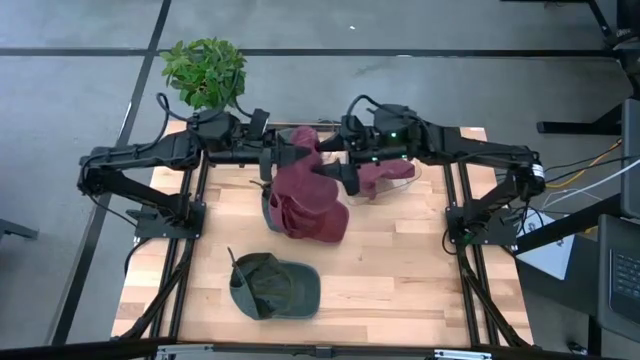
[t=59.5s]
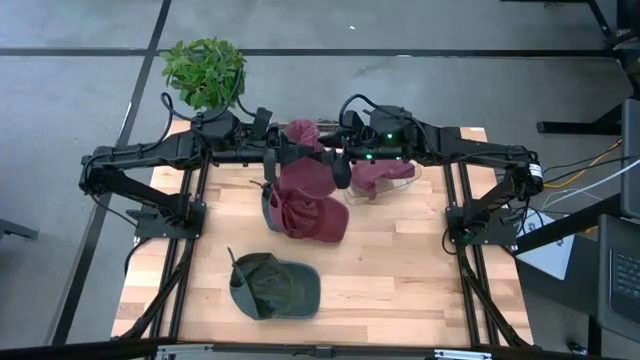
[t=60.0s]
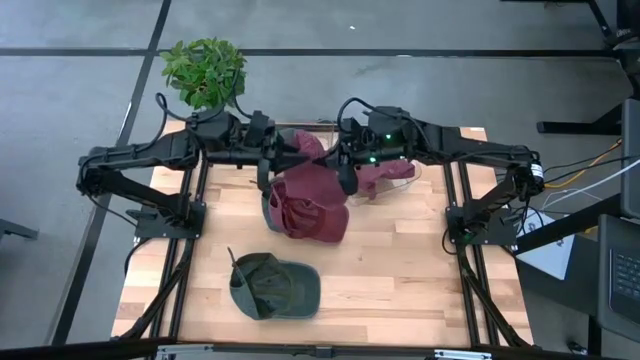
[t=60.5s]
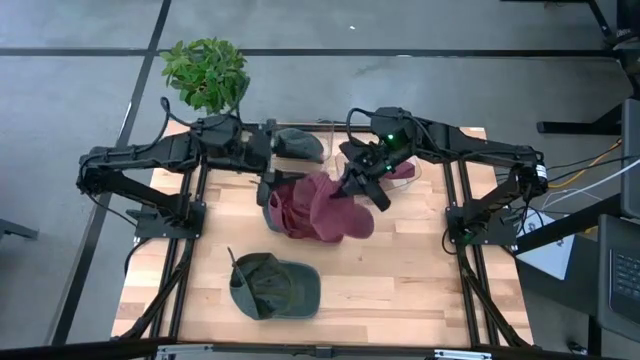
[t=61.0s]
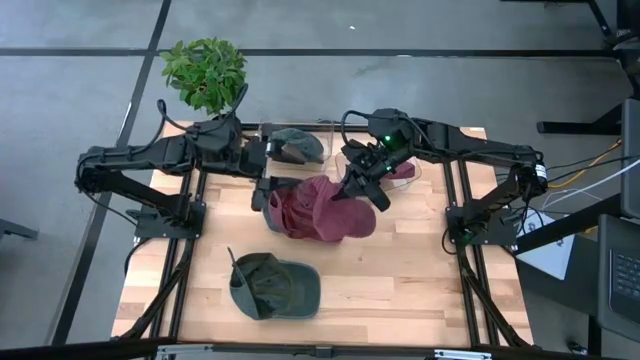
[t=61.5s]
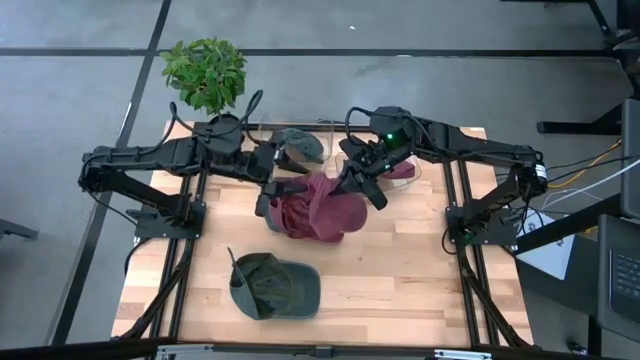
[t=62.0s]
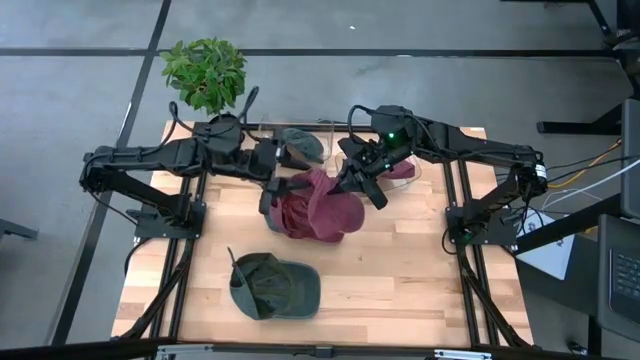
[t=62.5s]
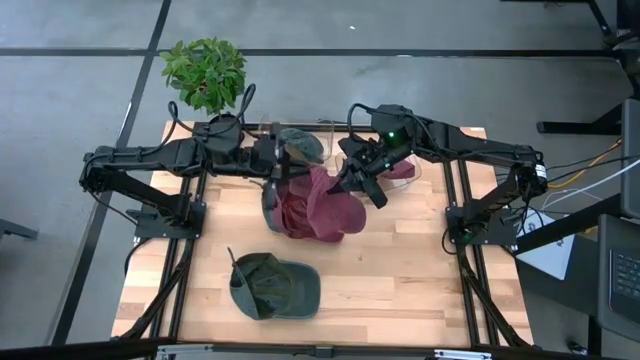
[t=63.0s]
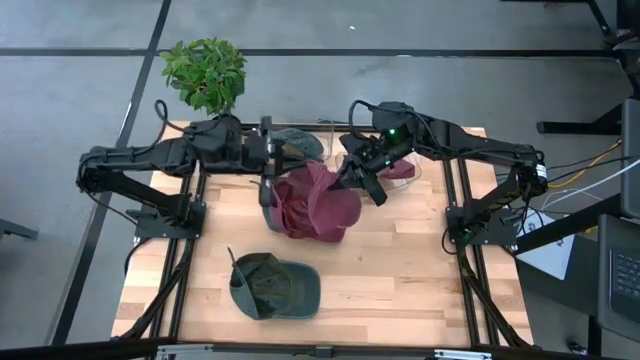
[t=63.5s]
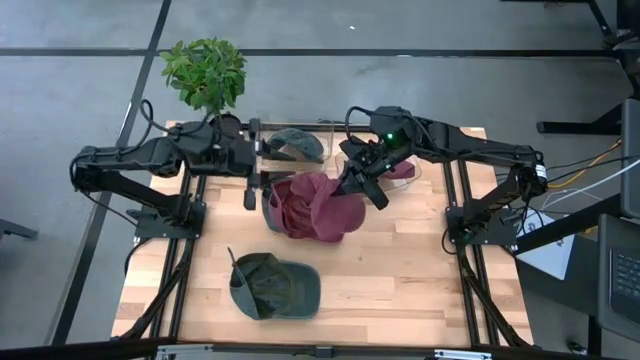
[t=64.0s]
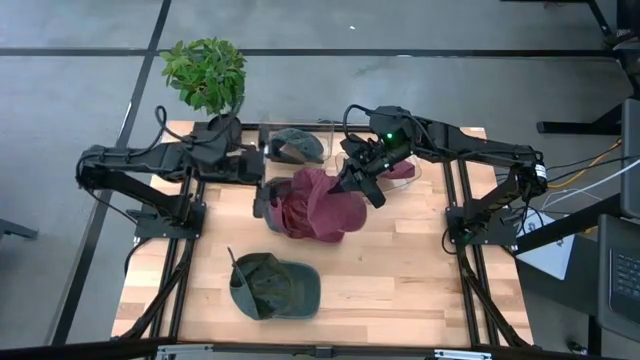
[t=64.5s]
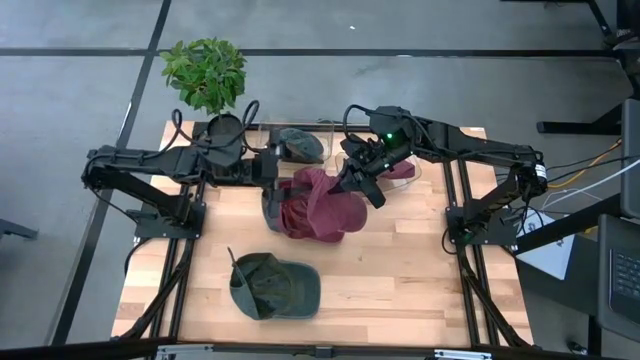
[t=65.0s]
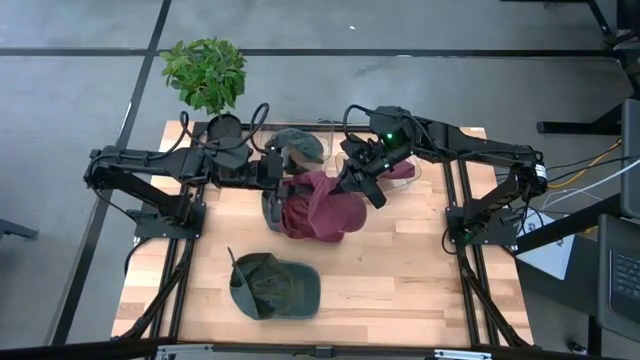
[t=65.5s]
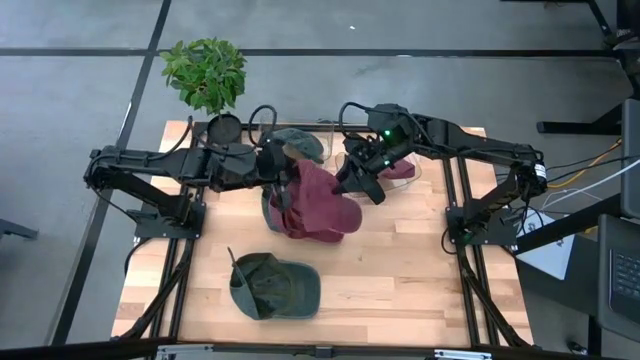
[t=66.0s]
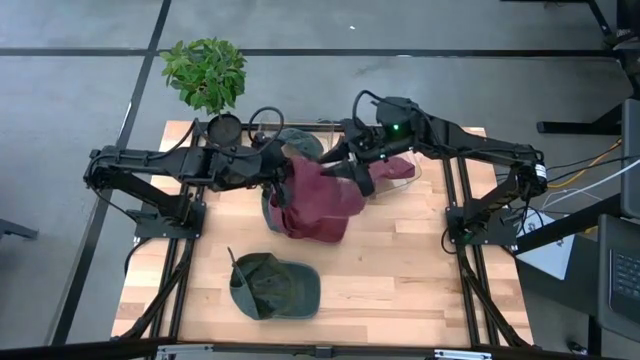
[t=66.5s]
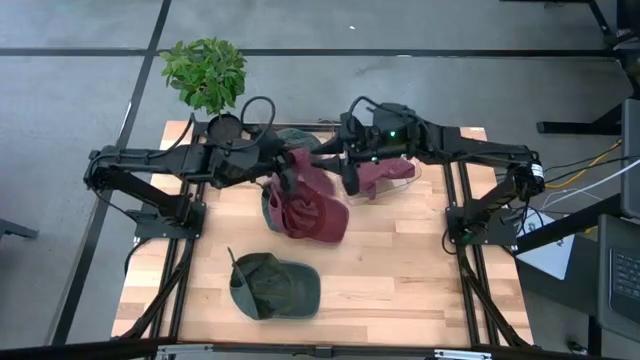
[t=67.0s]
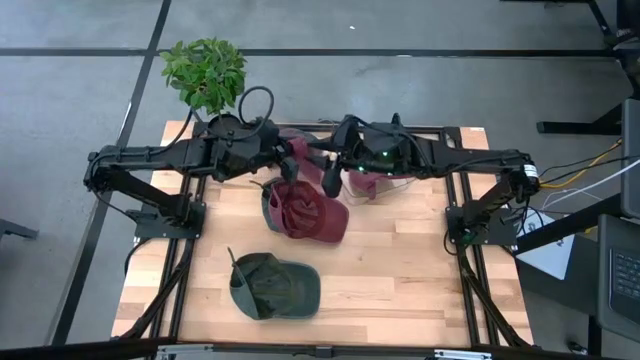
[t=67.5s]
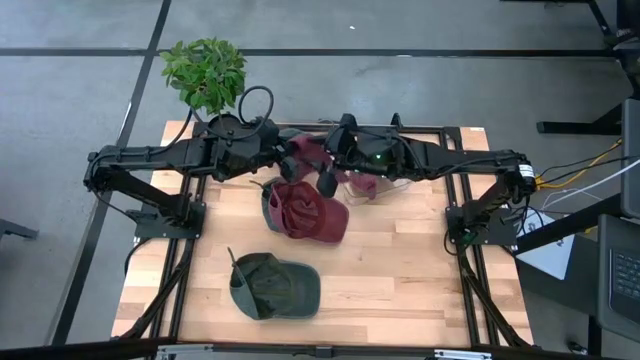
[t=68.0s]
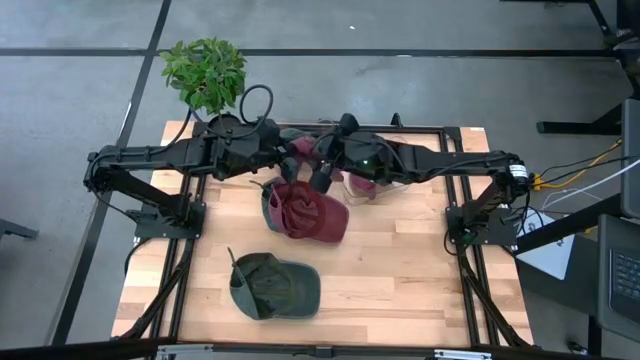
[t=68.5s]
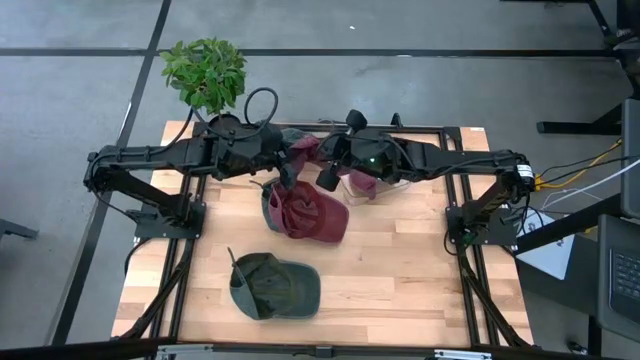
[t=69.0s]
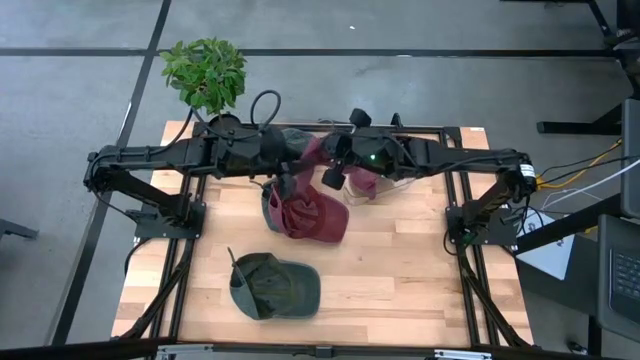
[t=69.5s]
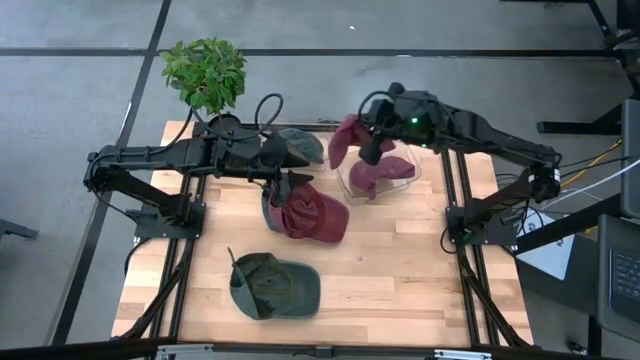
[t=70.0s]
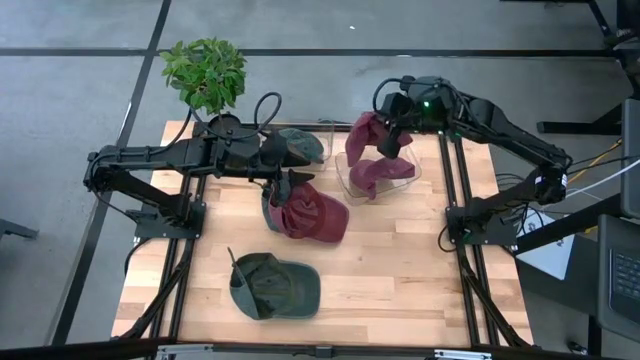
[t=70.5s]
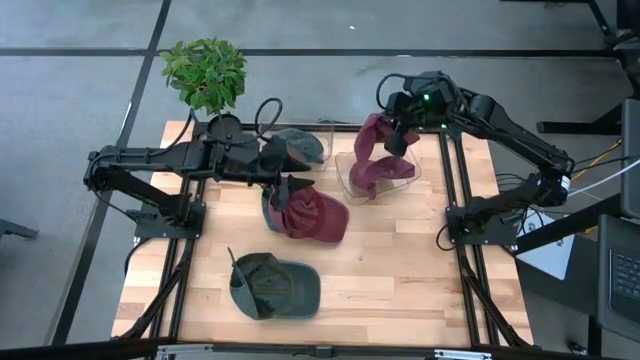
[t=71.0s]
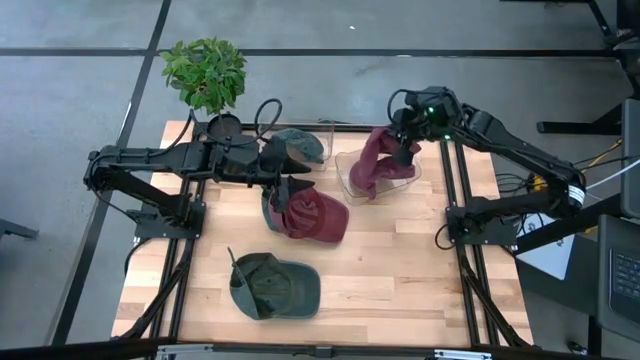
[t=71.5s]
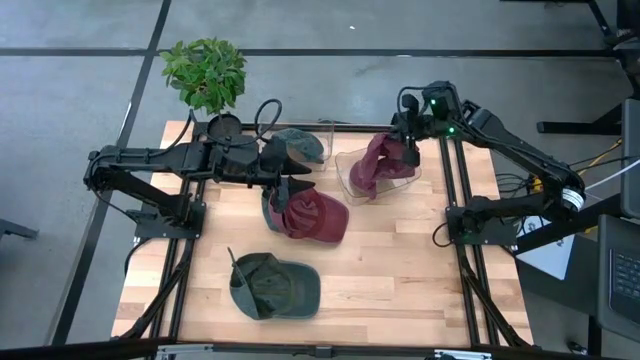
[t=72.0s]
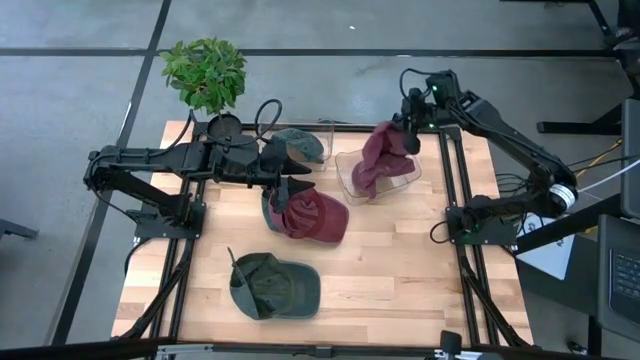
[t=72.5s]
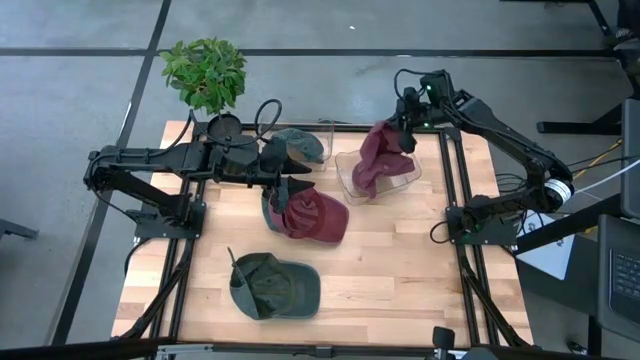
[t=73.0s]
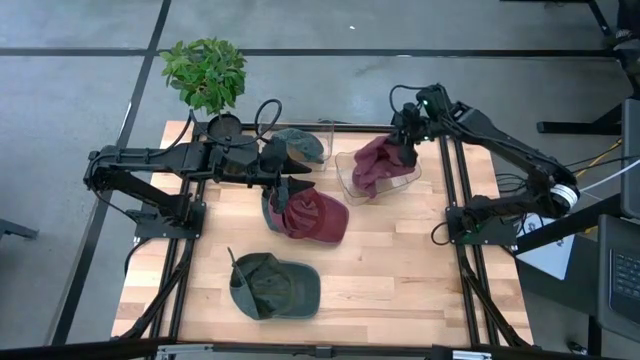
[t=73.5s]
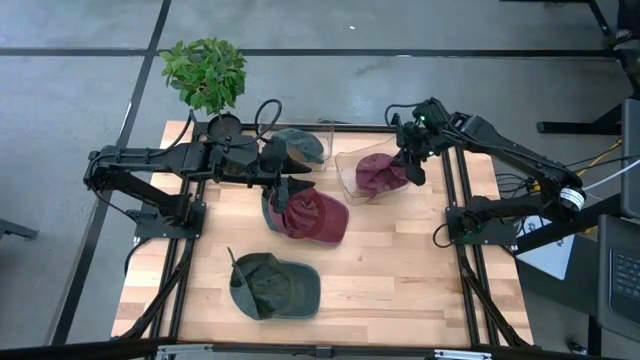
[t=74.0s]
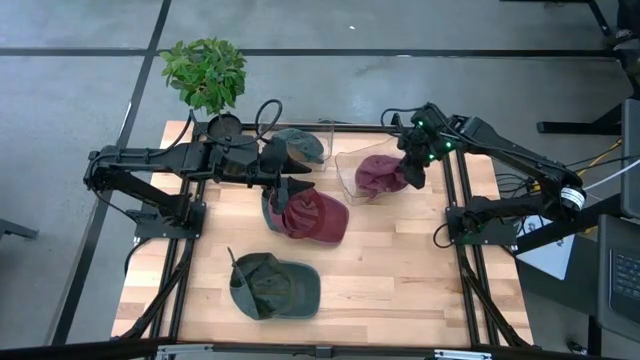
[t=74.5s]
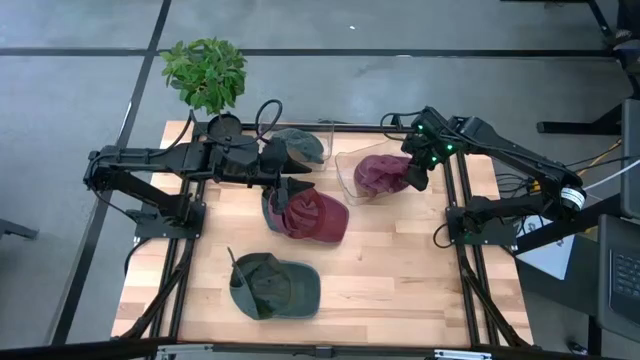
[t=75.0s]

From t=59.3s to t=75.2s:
Task: Pick & Place hat
Put the bottom red cap into the right transparent bin

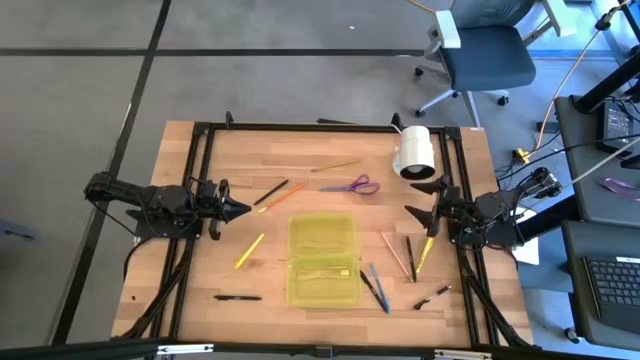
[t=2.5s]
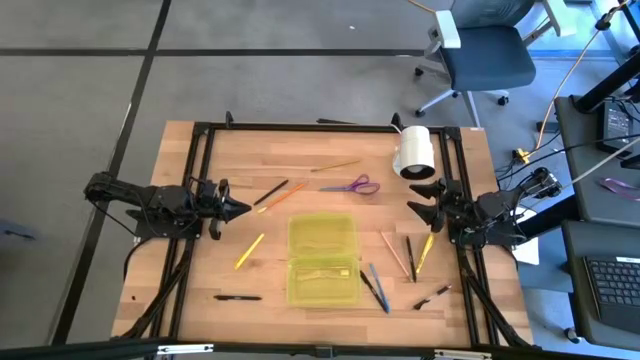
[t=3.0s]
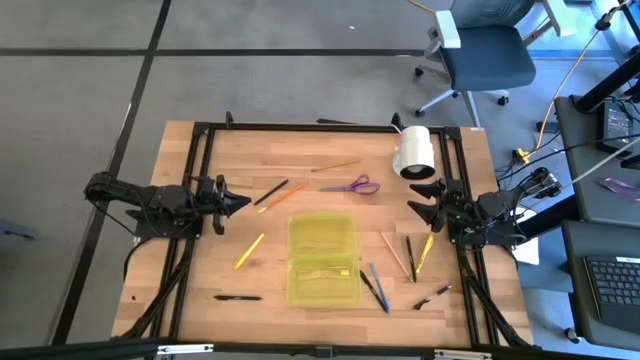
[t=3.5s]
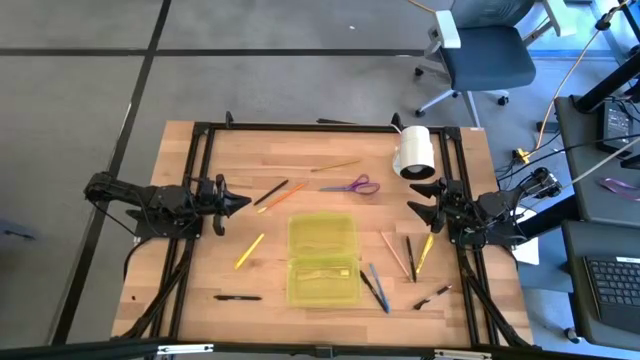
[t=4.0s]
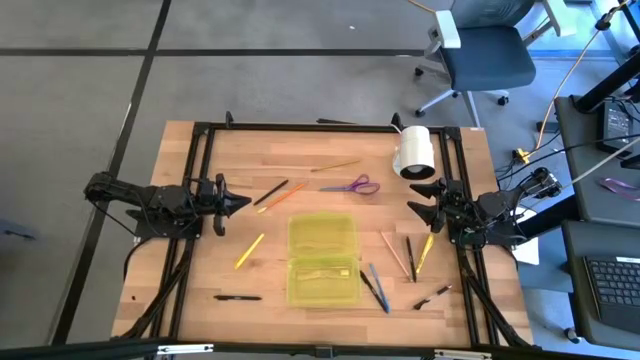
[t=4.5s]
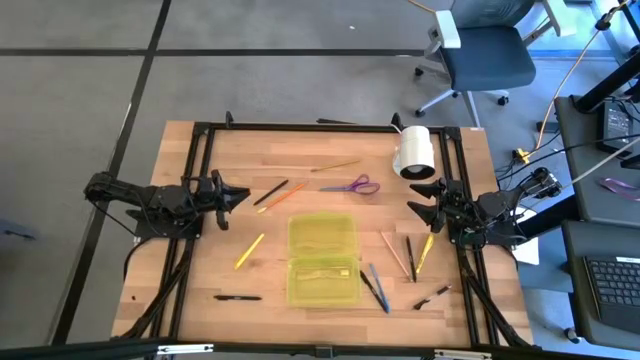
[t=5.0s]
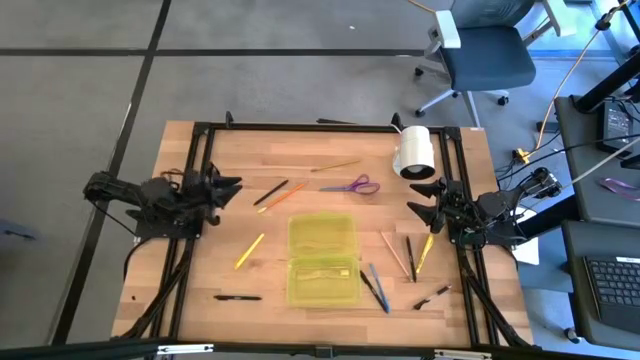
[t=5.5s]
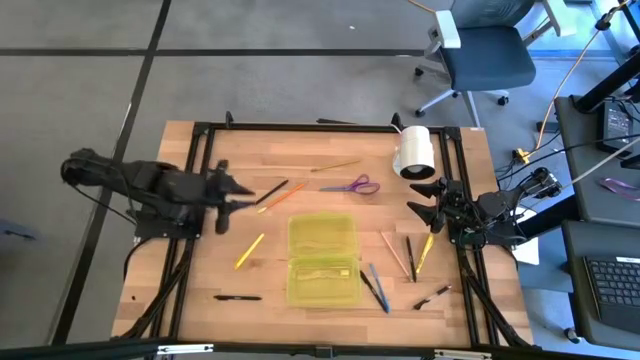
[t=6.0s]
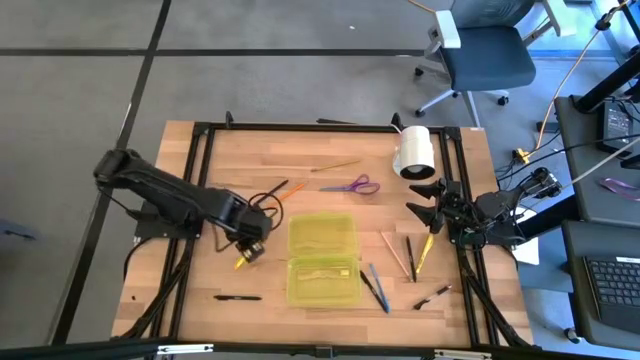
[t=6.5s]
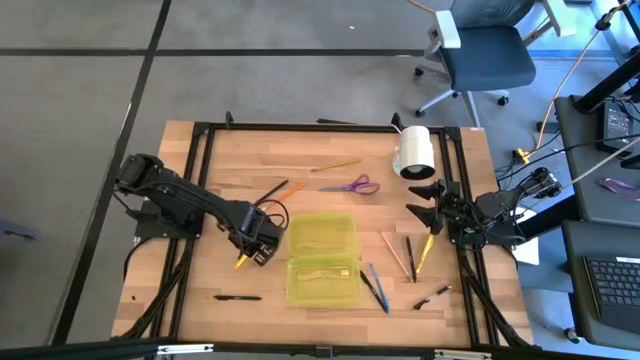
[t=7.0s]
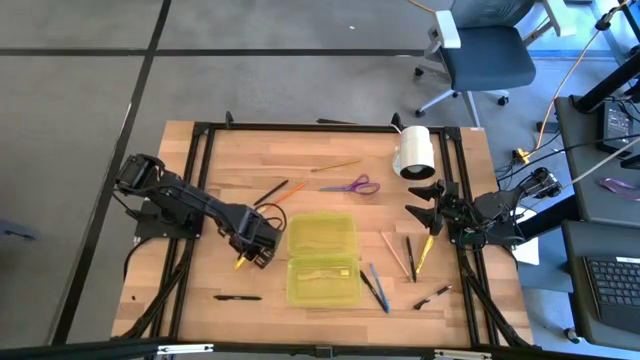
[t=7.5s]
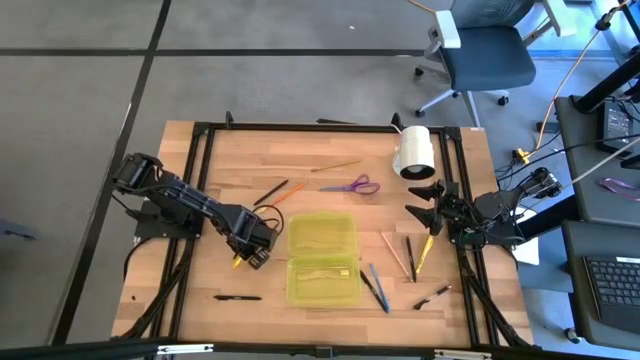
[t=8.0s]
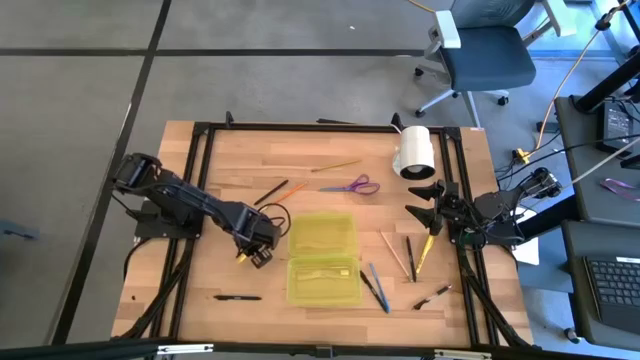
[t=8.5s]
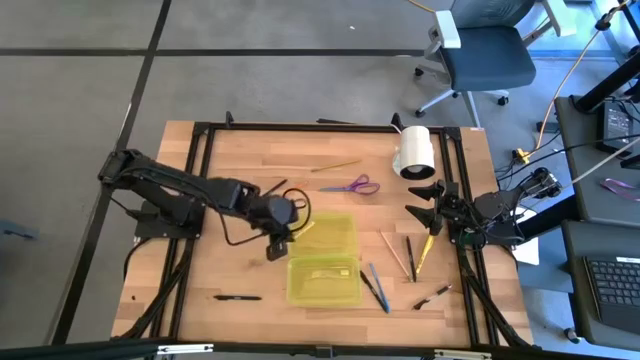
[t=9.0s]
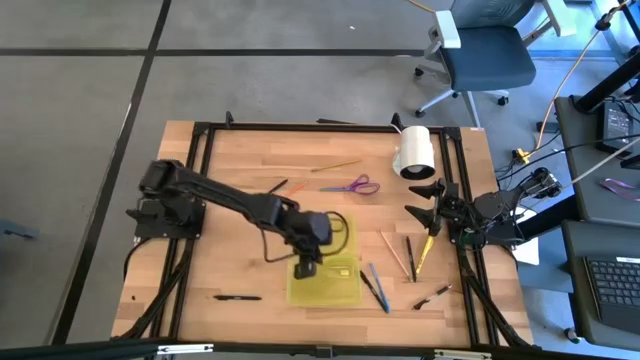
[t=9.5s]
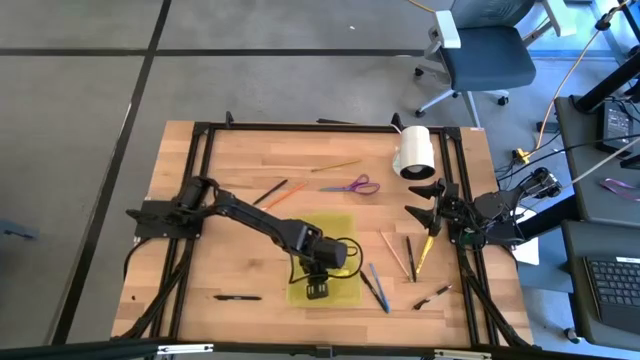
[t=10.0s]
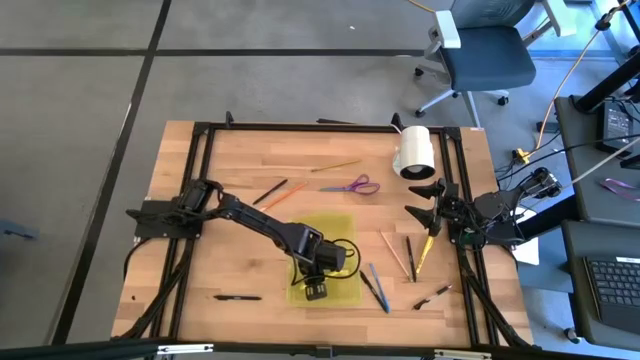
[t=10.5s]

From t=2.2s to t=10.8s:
Task: Pick & place school supplies into a supply box
Put the yellow marker into the yellow supply box
